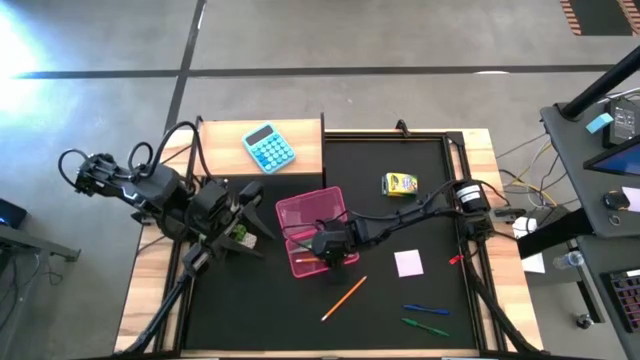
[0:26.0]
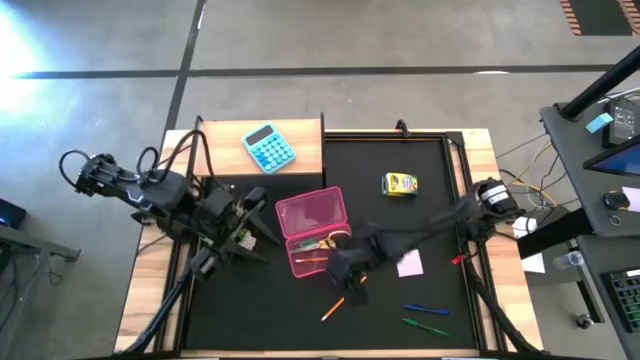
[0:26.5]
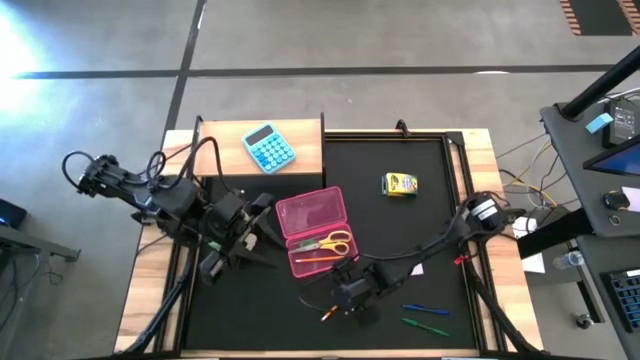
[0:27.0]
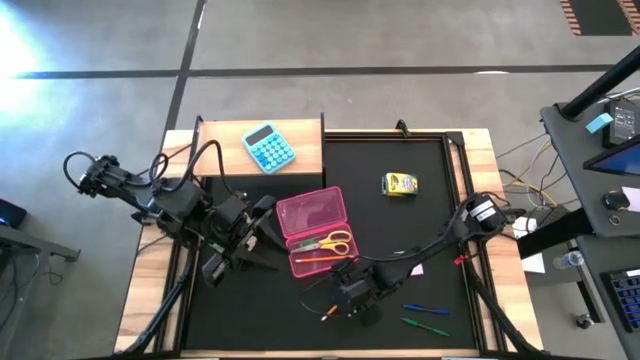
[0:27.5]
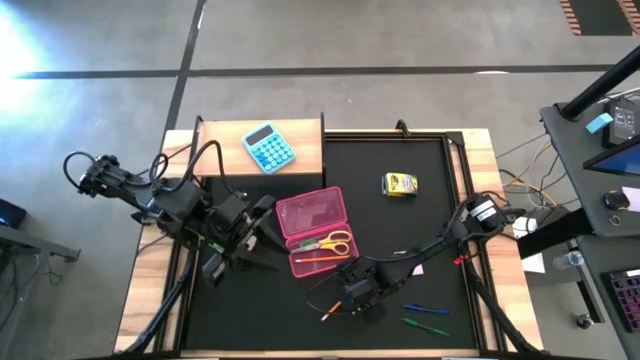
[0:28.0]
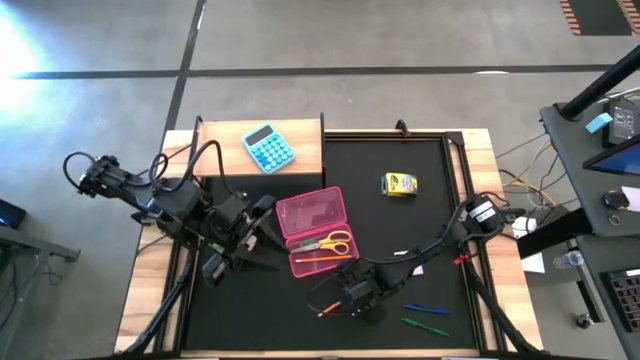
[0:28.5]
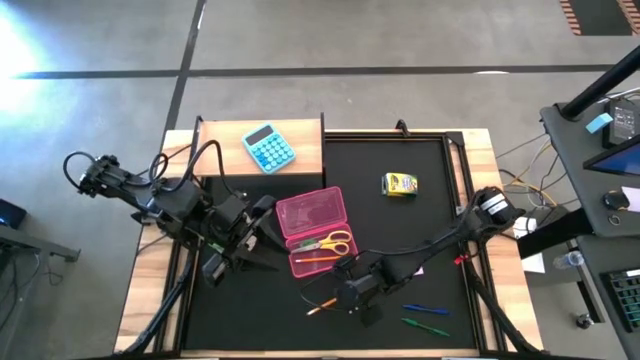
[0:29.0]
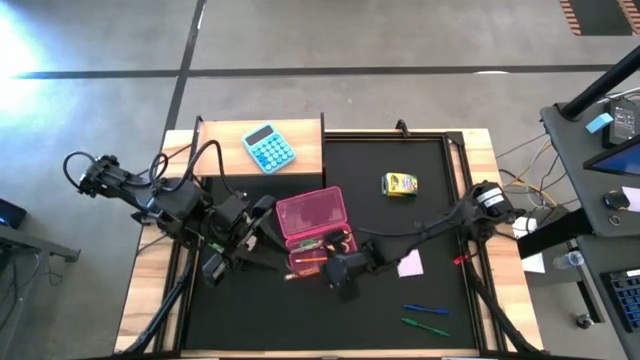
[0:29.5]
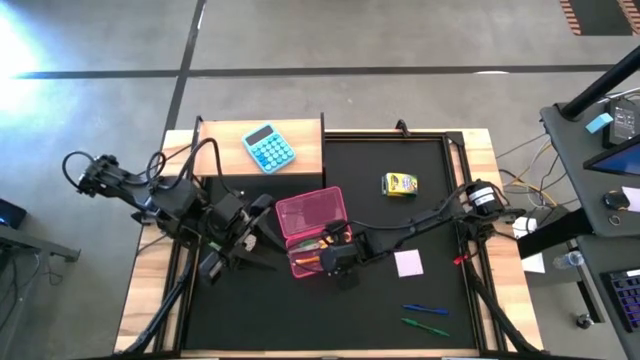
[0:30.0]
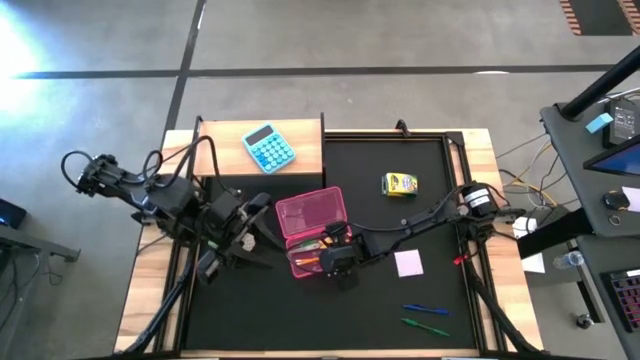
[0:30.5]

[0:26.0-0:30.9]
Task: Pack school essentials
Put the yellow pencil into the pink box

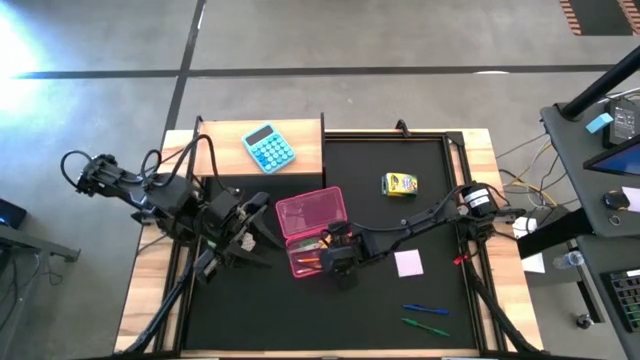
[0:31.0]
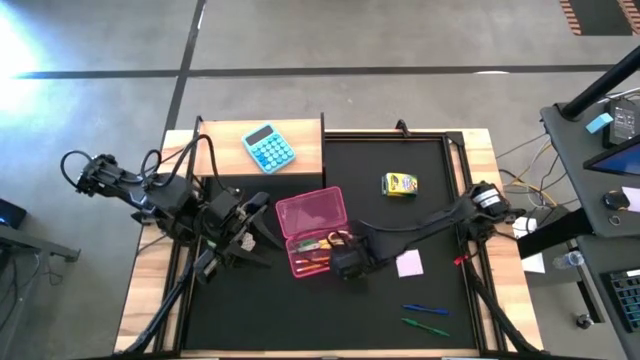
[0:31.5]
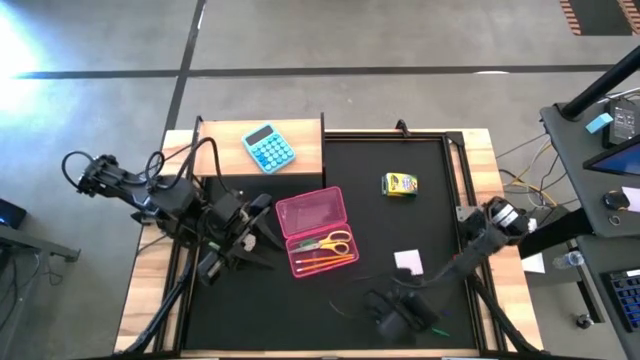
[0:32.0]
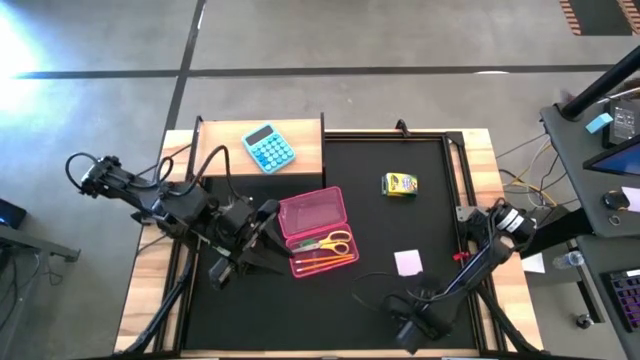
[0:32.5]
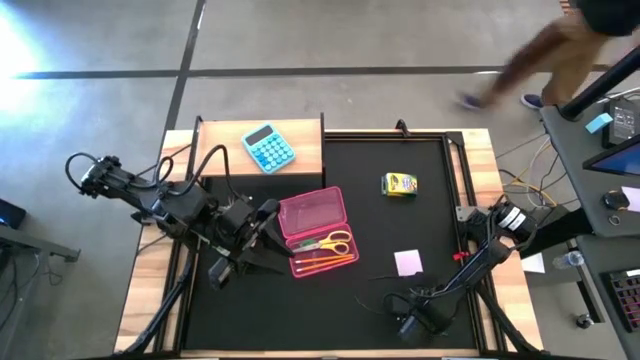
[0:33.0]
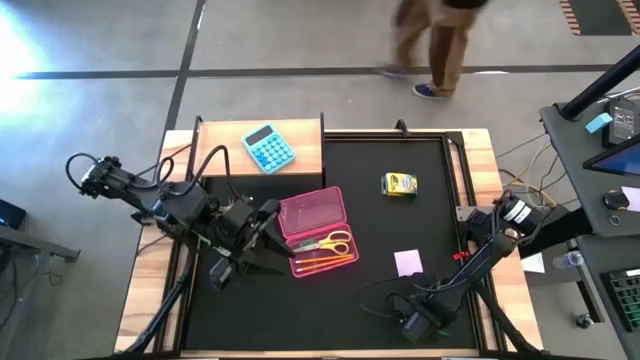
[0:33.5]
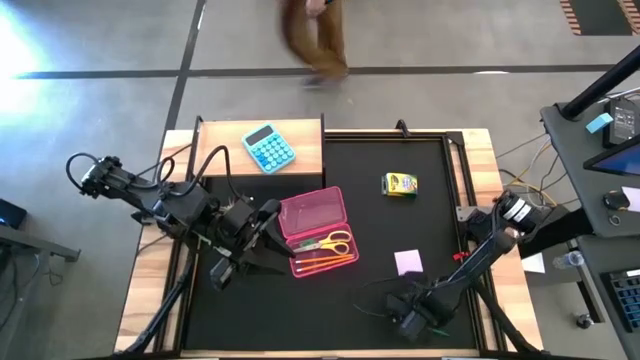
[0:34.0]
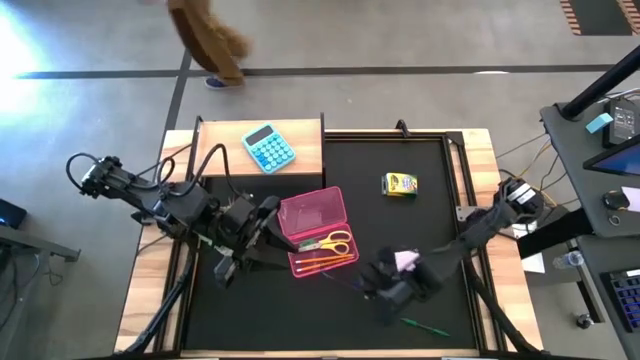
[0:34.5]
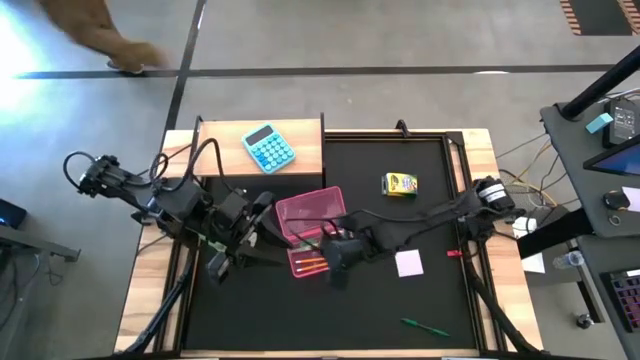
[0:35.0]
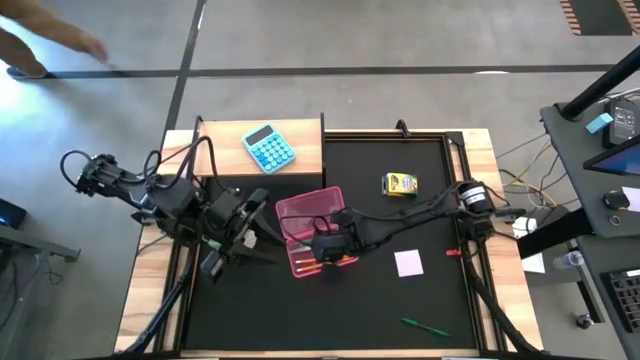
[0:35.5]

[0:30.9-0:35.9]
Put the blue pen into the pink box

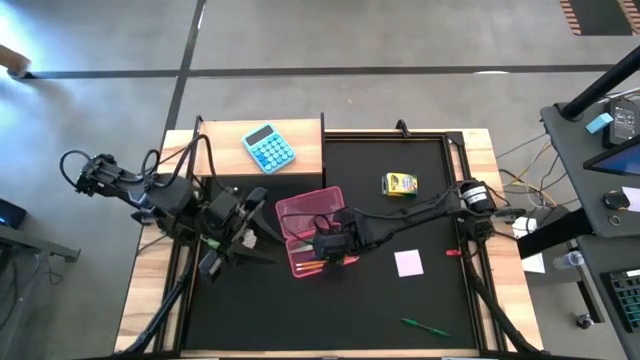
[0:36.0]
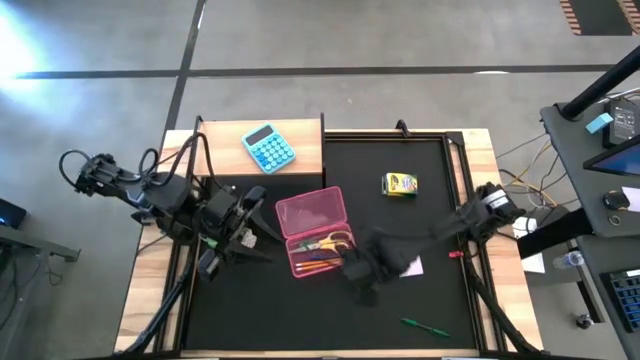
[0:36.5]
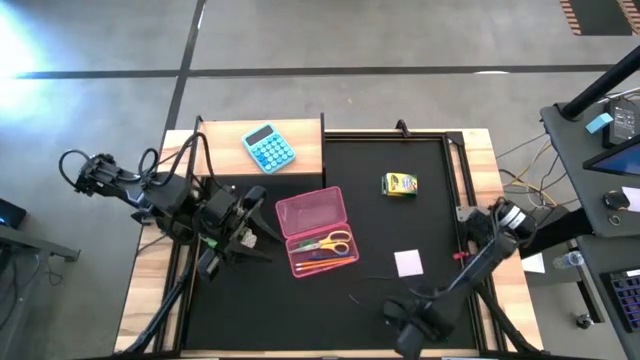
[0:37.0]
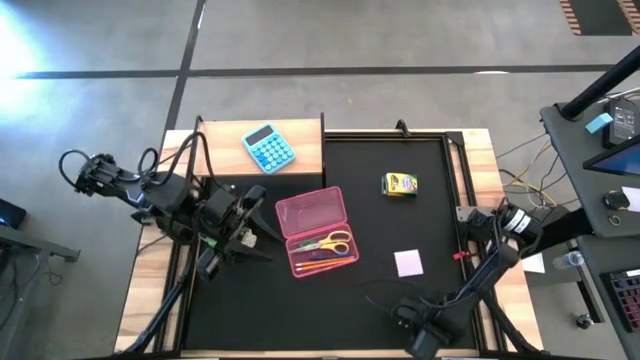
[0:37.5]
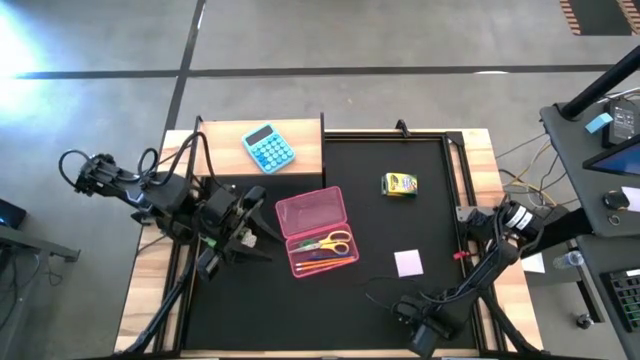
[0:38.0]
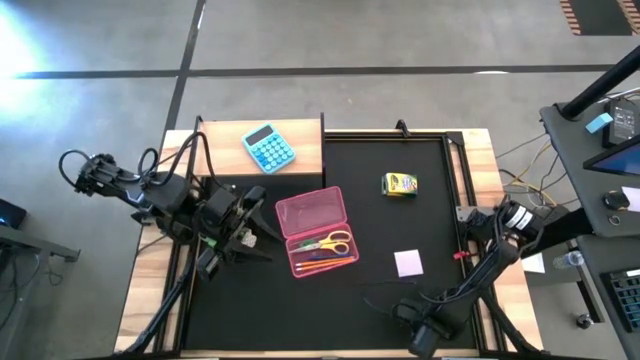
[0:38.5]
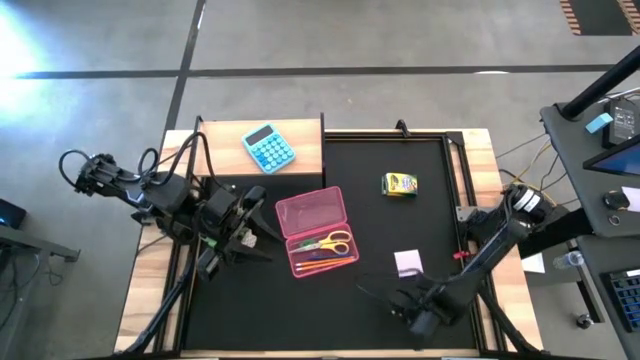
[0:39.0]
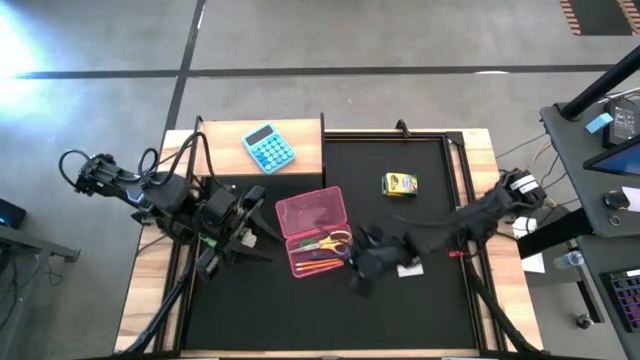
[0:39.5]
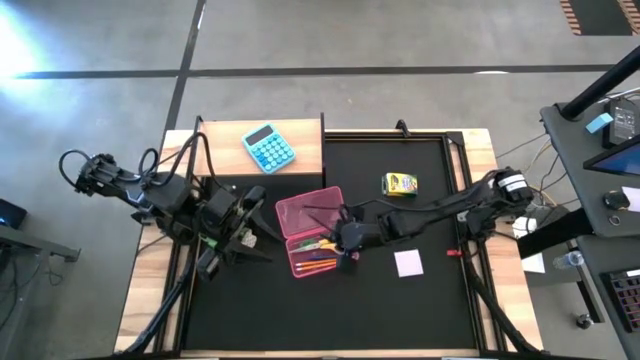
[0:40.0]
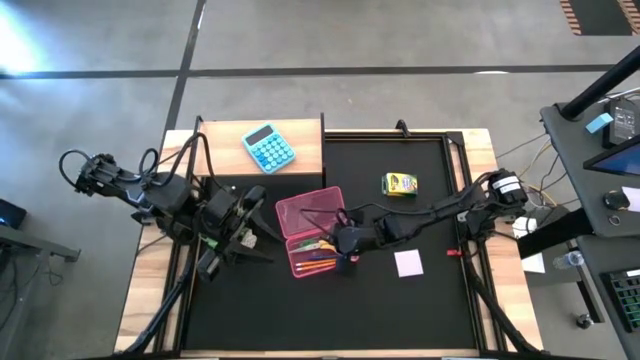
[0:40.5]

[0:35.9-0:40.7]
Put the green pen into the pink box

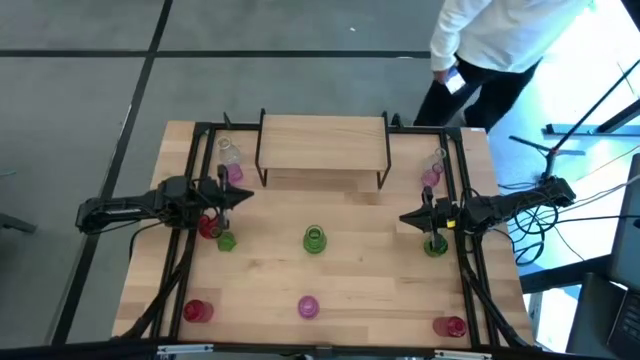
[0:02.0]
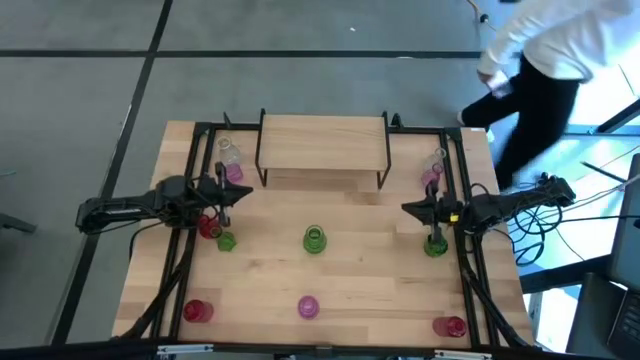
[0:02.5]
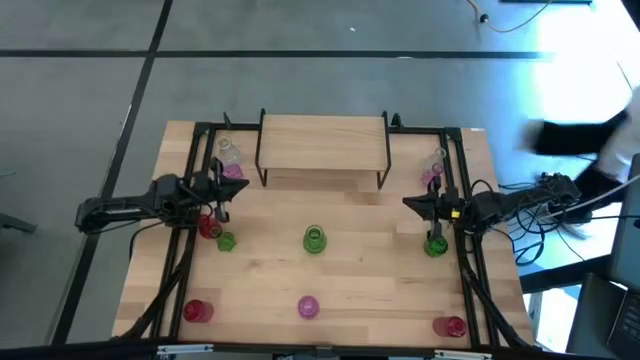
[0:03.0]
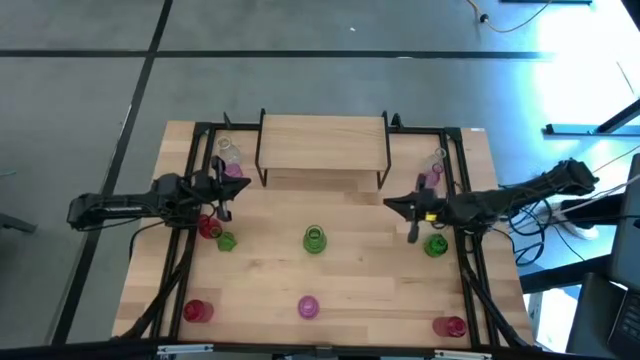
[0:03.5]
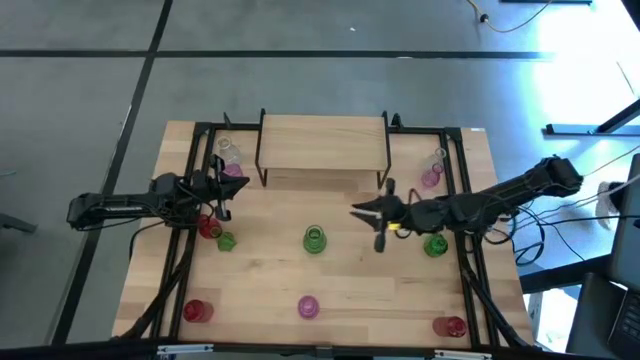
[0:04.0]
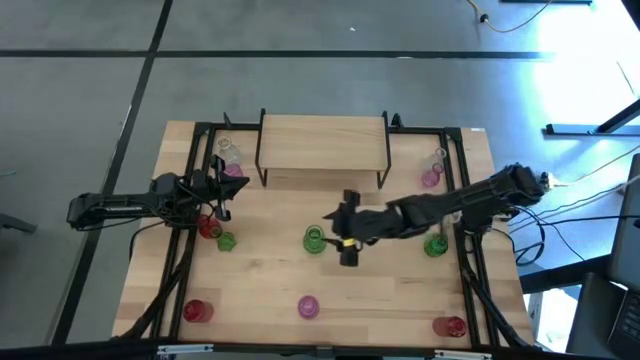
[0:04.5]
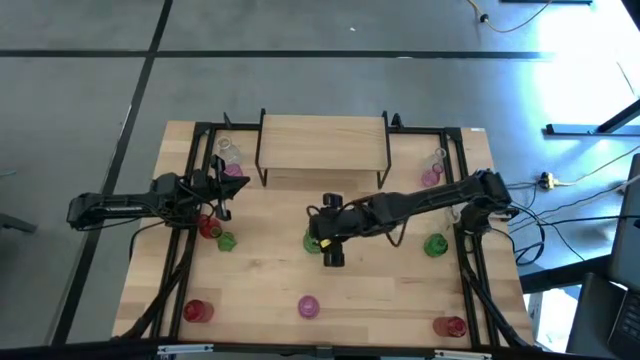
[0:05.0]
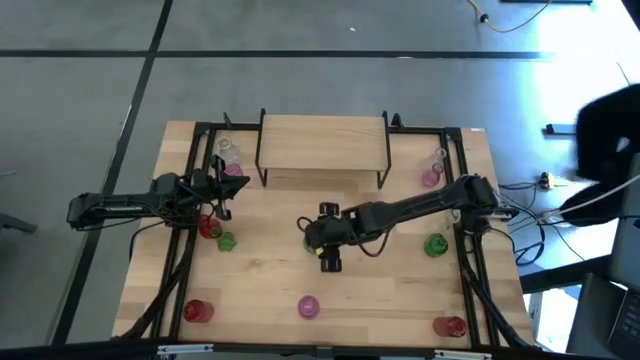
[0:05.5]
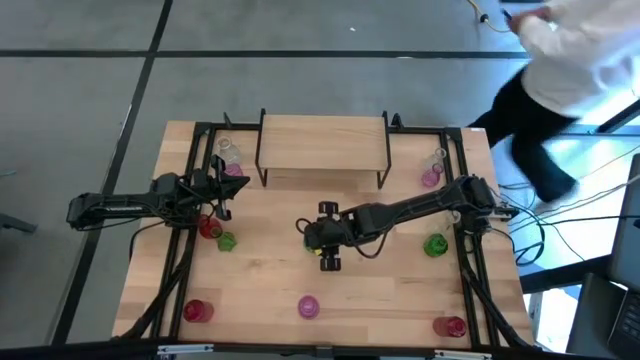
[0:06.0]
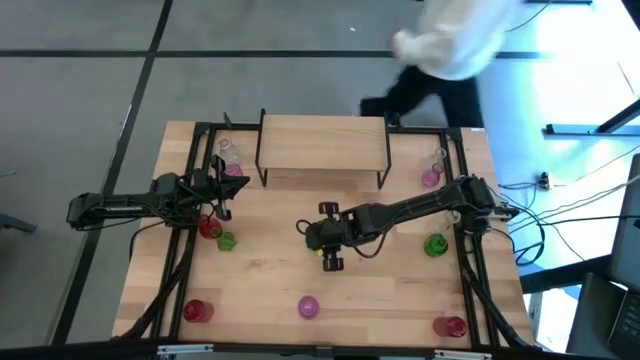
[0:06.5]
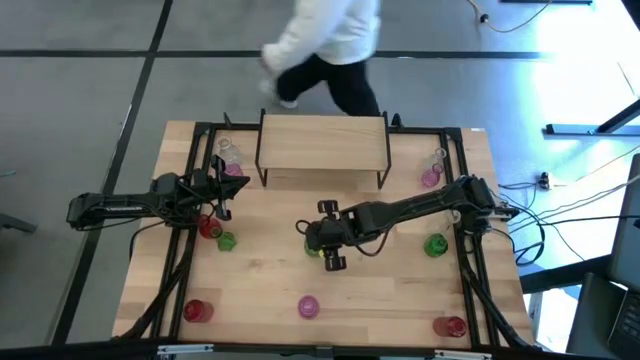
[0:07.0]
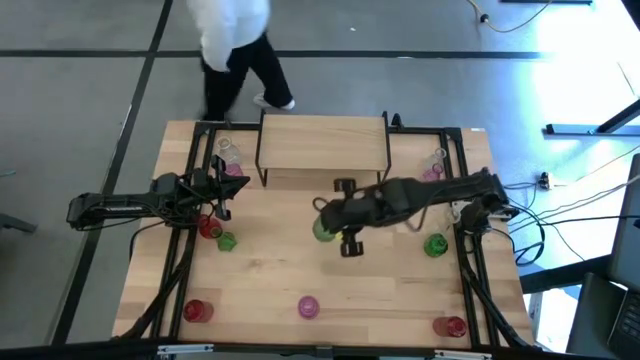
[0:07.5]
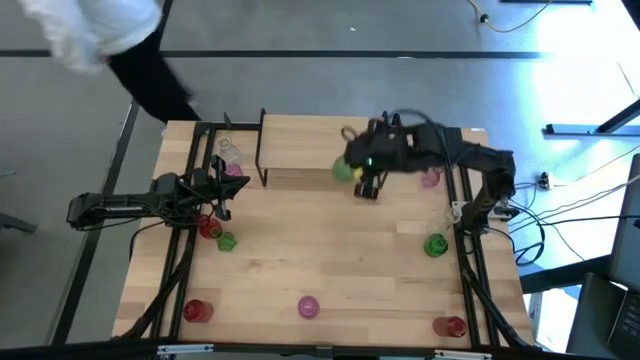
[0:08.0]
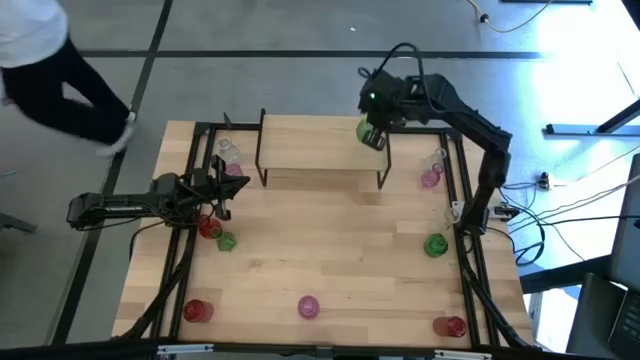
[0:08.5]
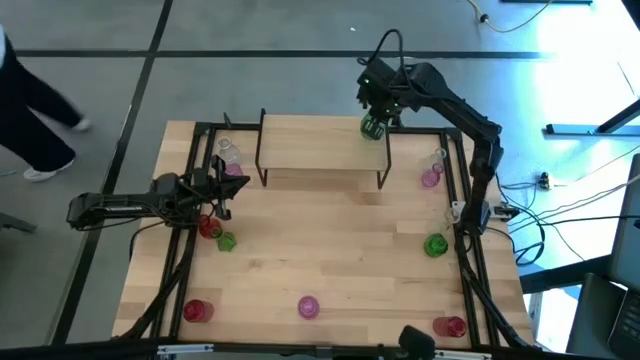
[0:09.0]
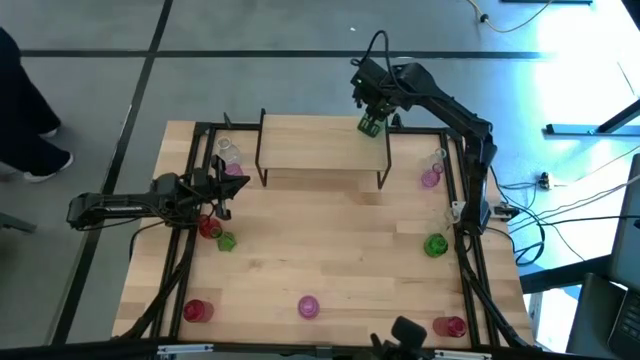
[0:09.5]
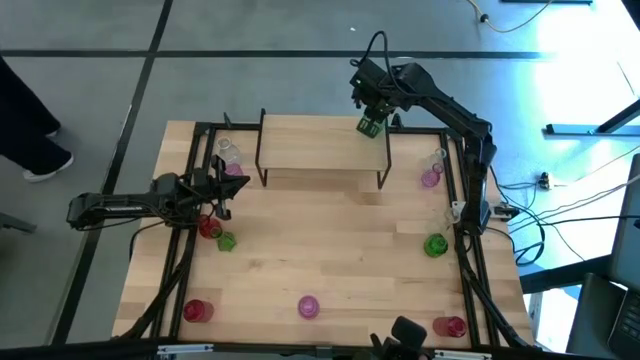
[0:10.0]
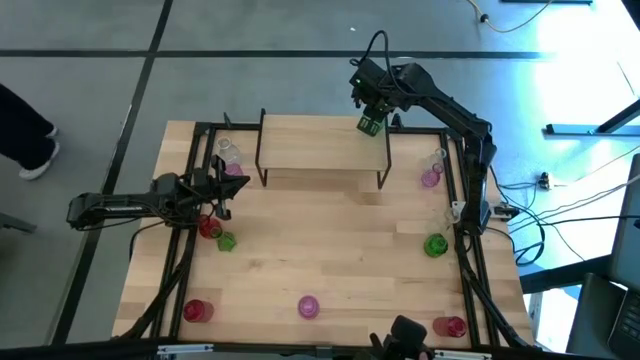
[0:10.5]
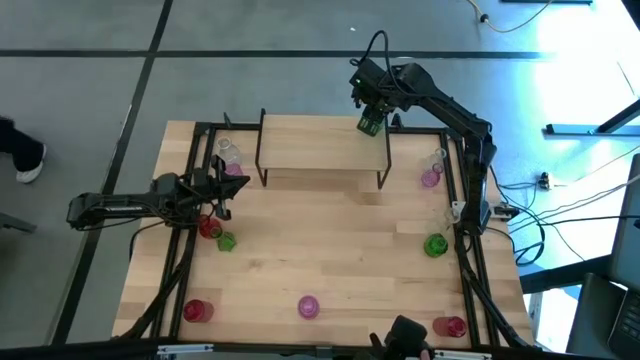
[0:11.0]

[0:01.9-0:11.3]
Task: sort vases onto shelf
Put the middle green vase on the shelf
